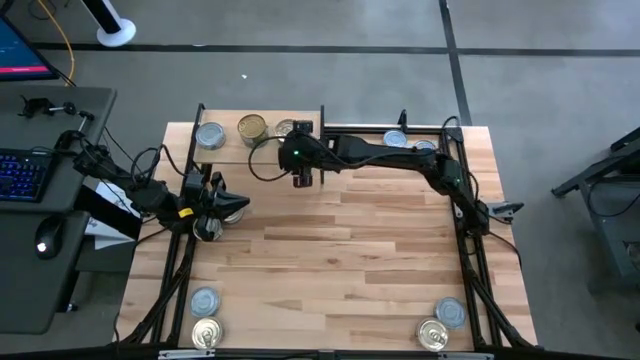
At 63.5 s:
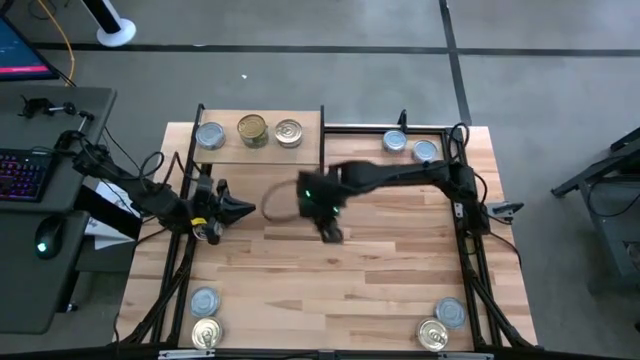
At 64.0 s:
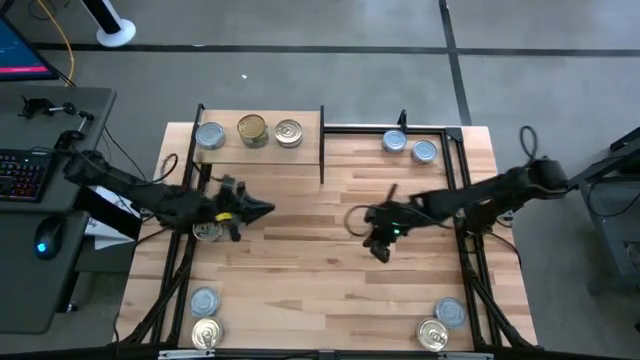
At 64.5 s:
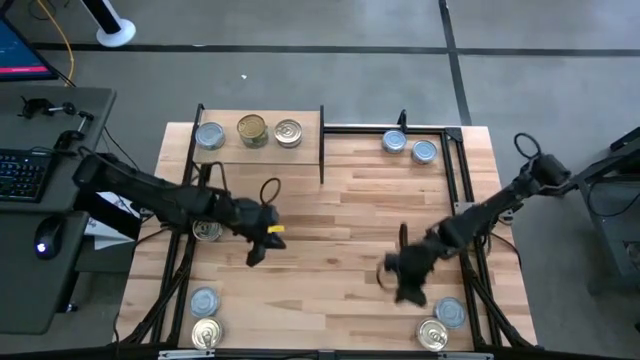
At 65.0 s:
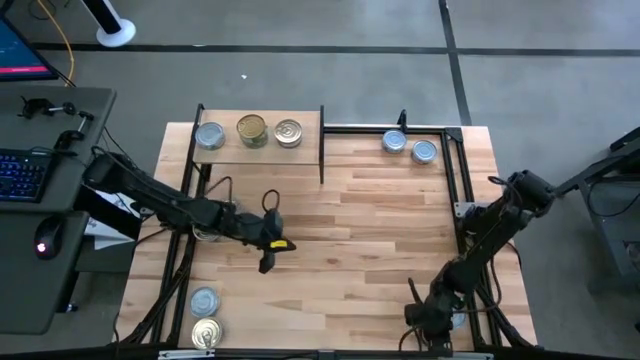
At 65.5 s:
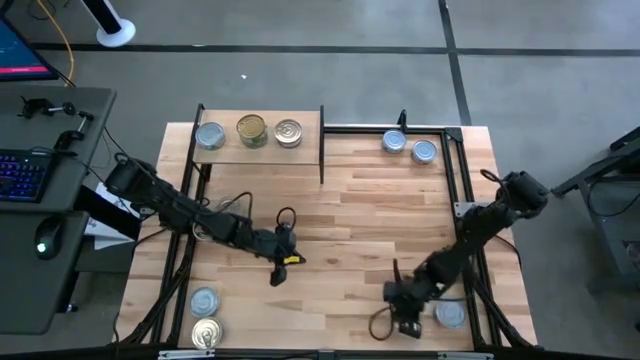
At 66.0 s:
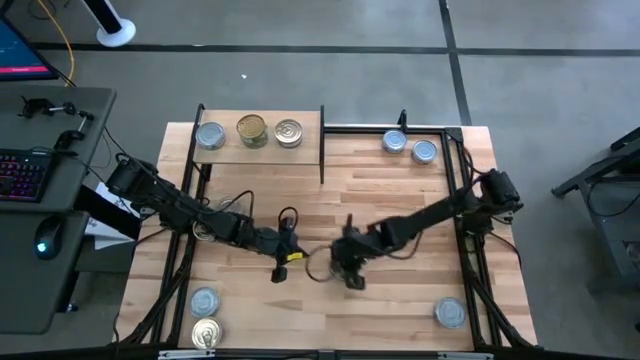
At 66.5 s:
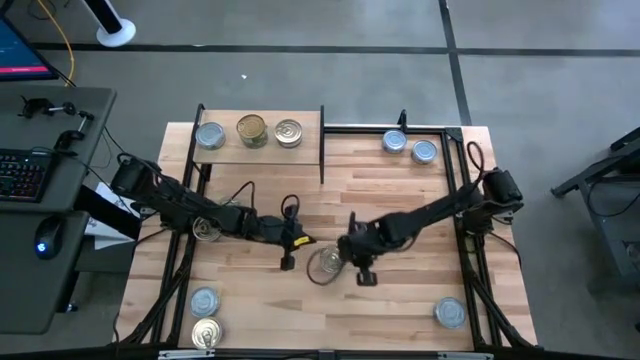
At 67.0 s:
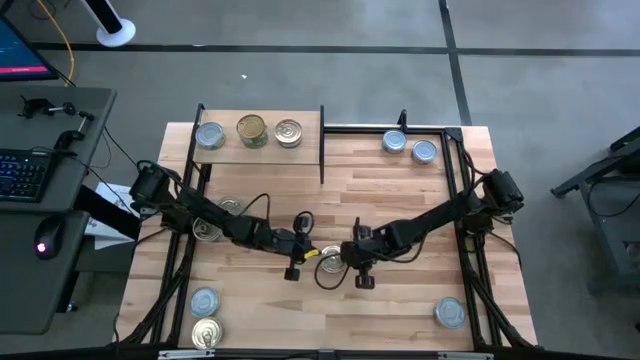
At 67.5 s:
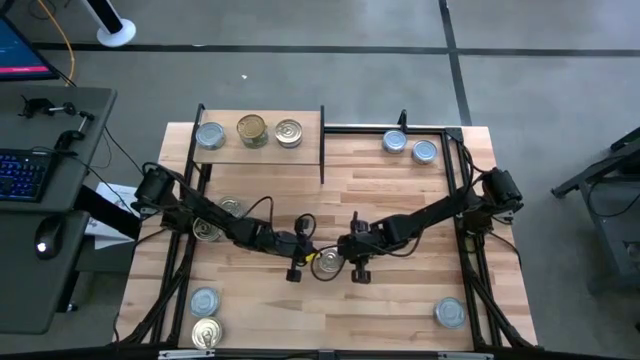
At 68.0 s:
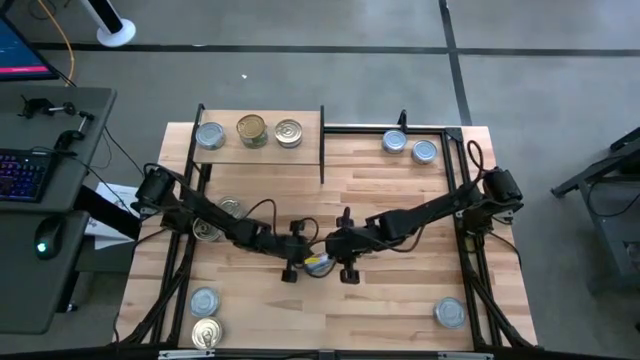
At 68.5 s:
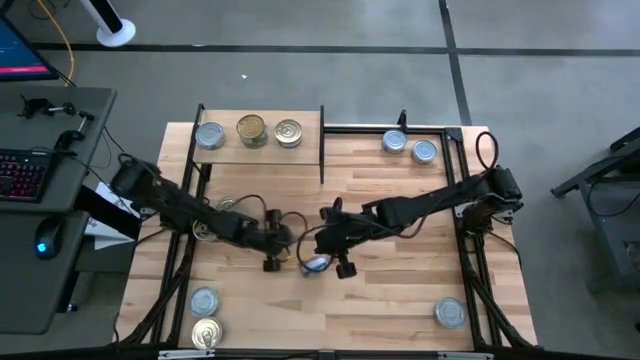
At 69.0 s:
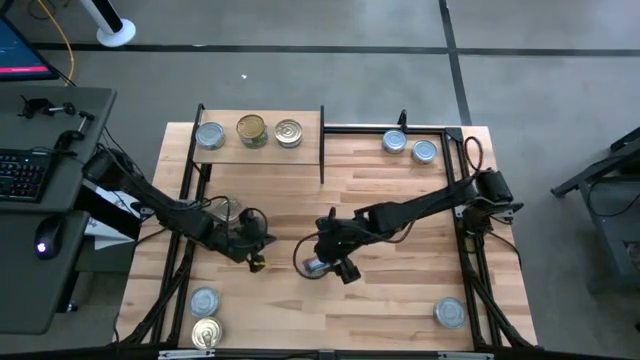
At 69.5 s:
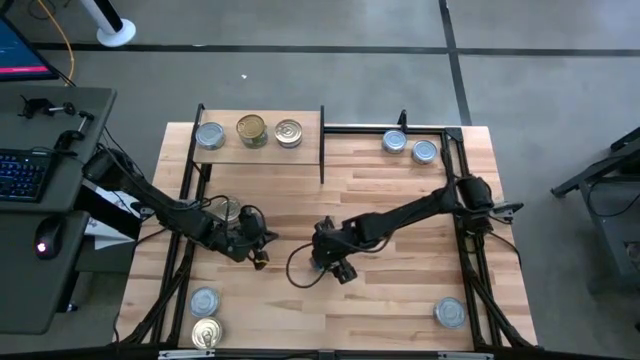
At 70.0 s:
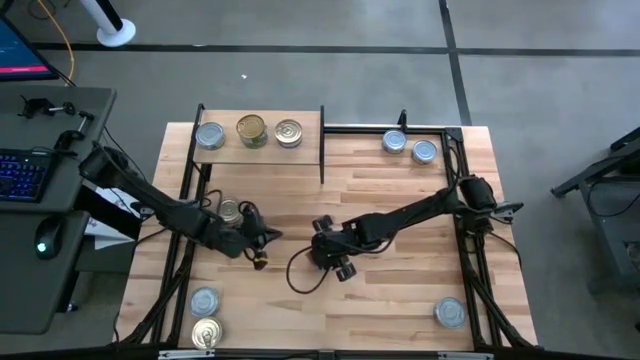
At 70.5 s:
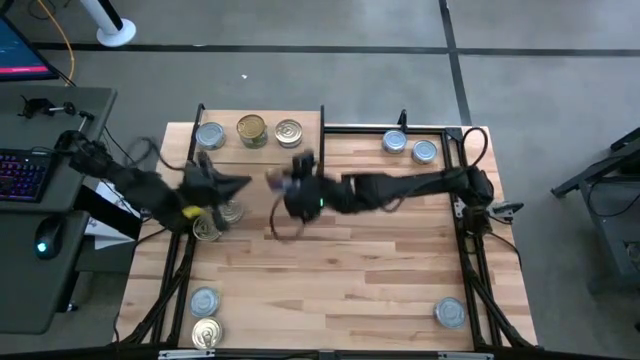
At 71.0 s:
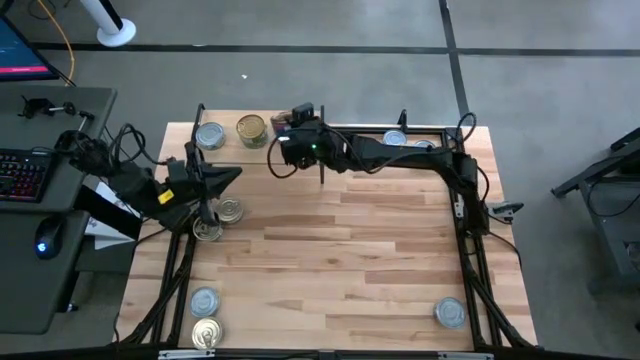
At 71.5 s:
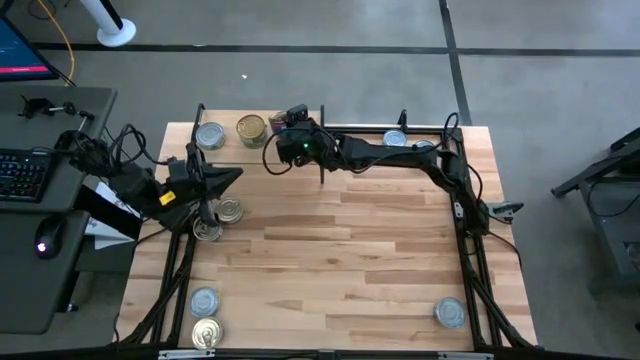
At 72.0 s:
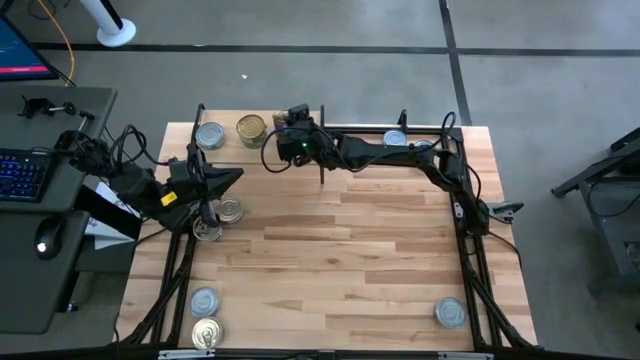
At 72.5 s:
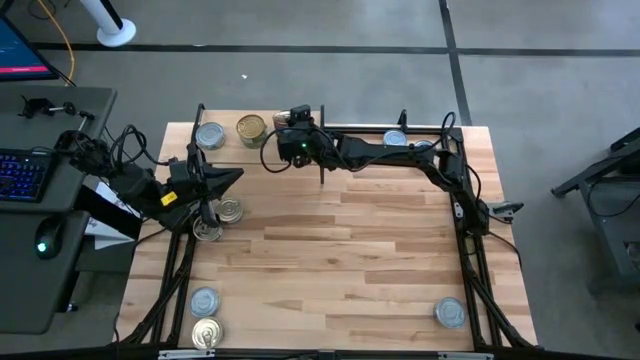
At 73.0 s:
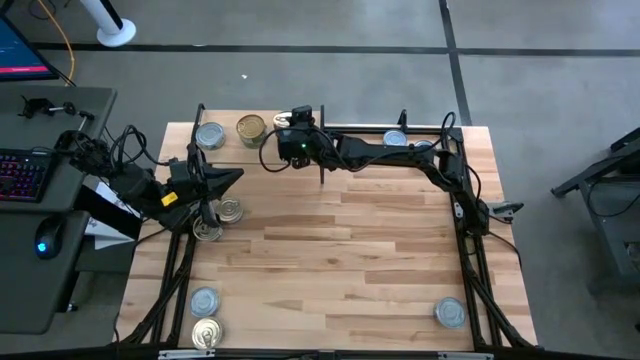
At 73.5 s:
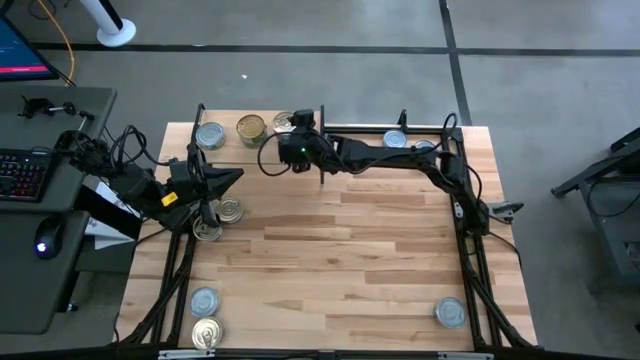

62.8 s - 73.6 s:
Task: Stack canned seafood by type on shelf
Stack the blue-pink tuna can on top of the blue-pink tuna can on the shelf

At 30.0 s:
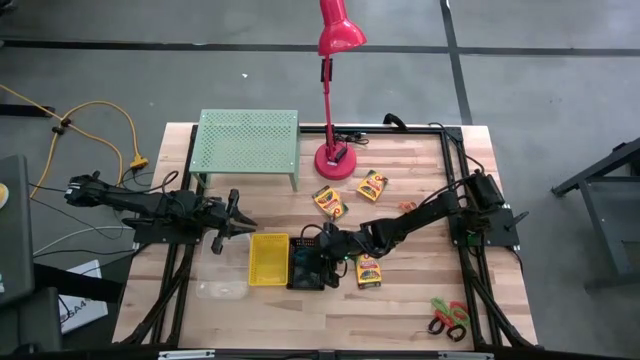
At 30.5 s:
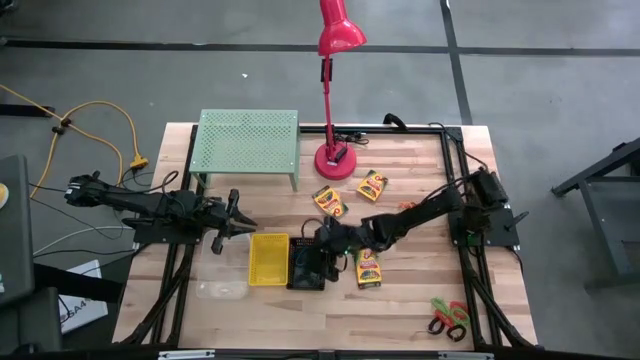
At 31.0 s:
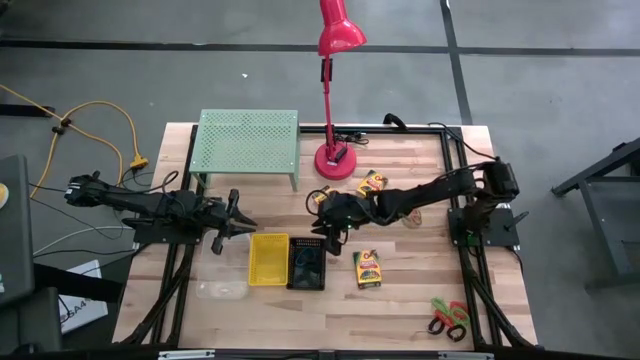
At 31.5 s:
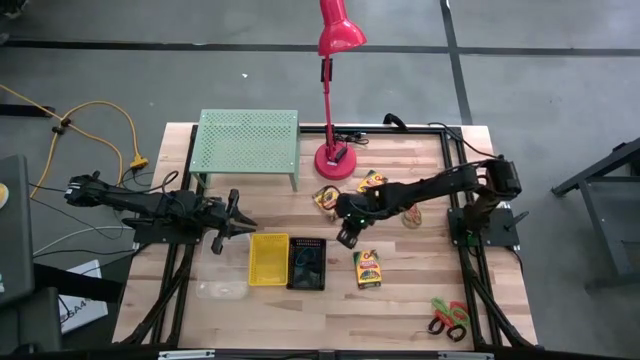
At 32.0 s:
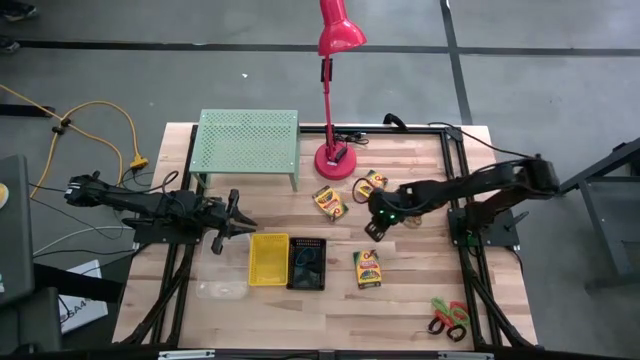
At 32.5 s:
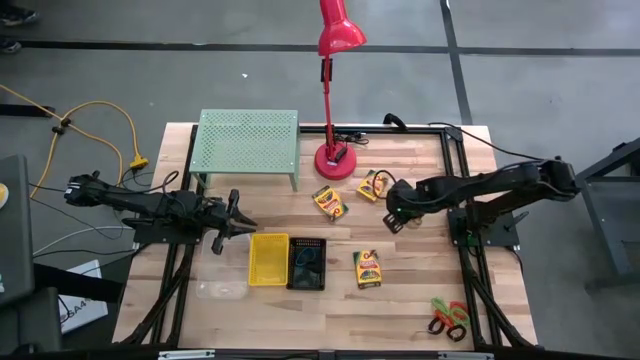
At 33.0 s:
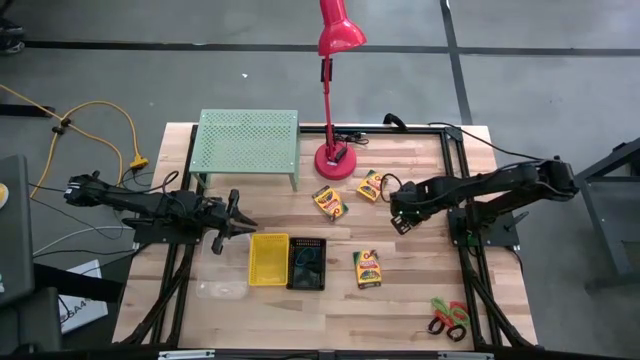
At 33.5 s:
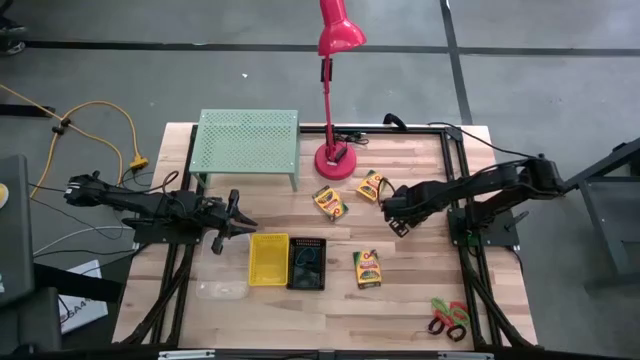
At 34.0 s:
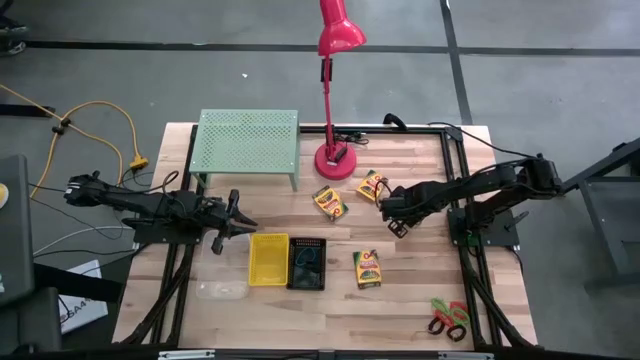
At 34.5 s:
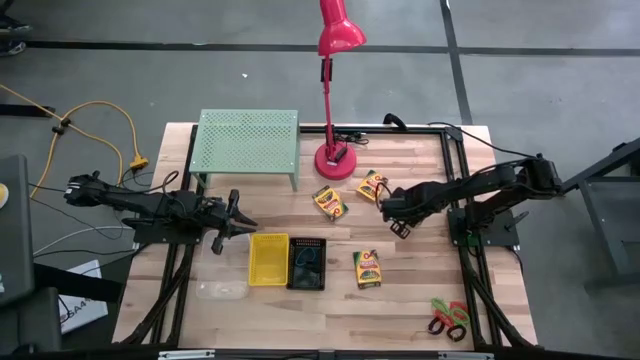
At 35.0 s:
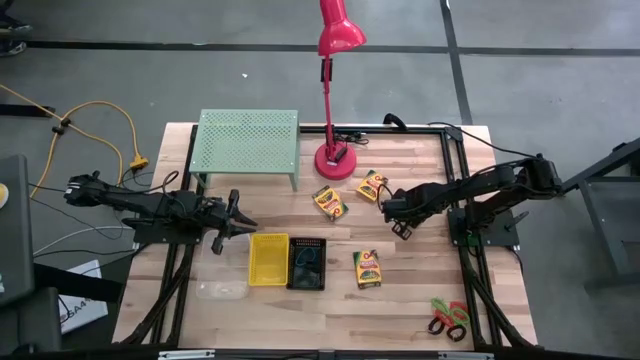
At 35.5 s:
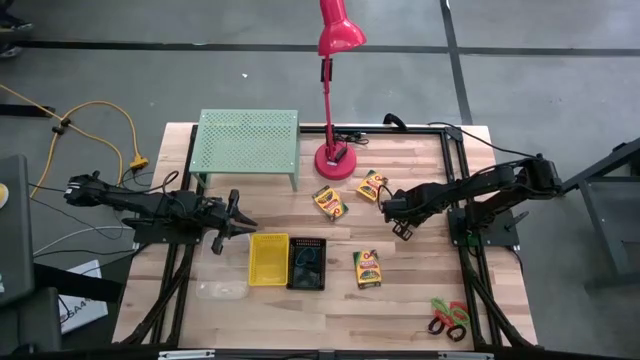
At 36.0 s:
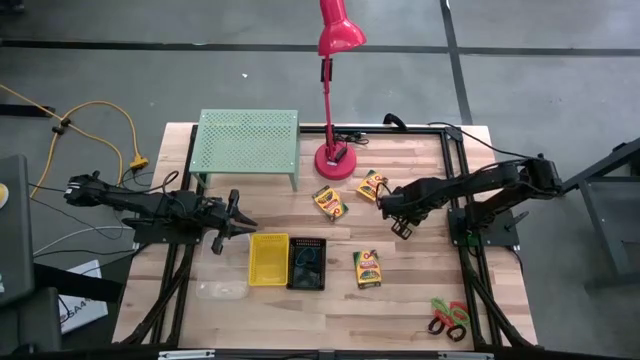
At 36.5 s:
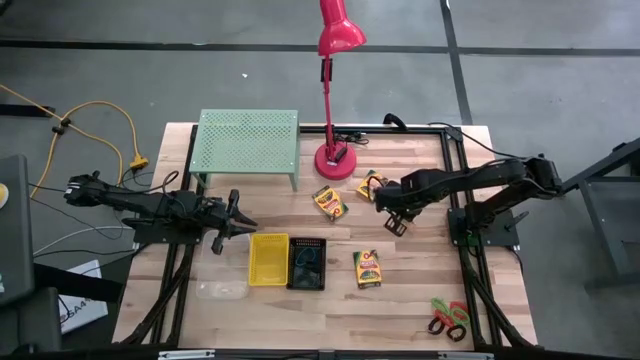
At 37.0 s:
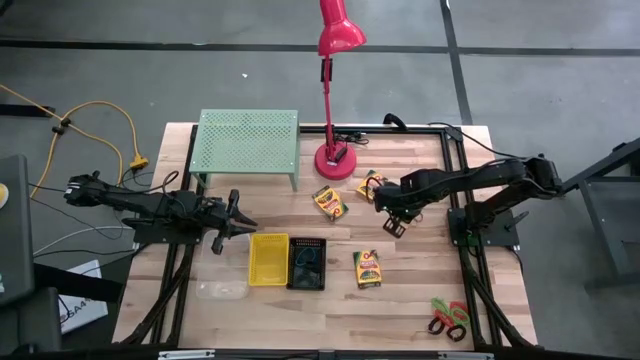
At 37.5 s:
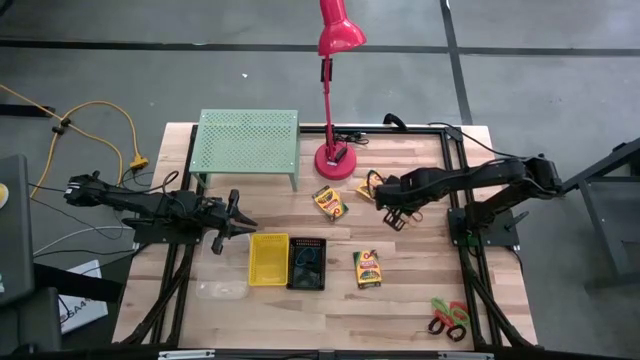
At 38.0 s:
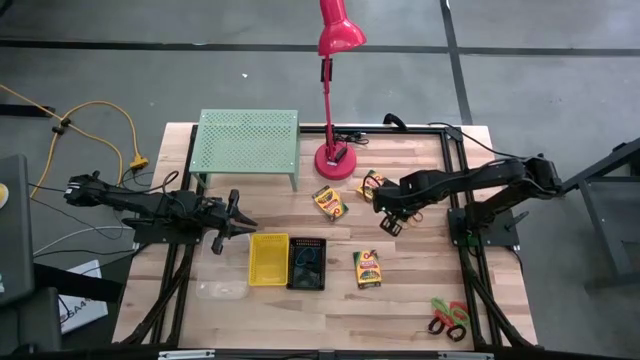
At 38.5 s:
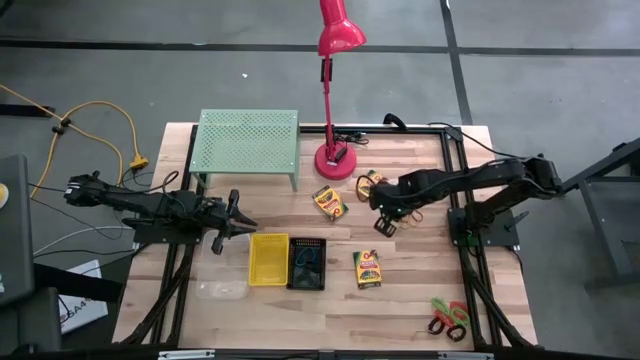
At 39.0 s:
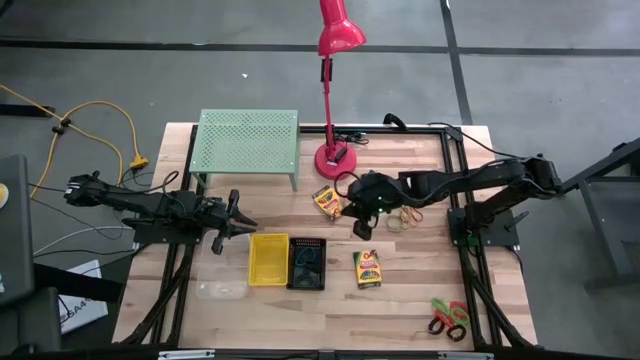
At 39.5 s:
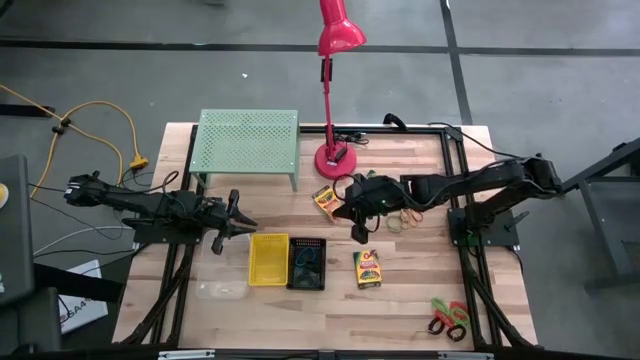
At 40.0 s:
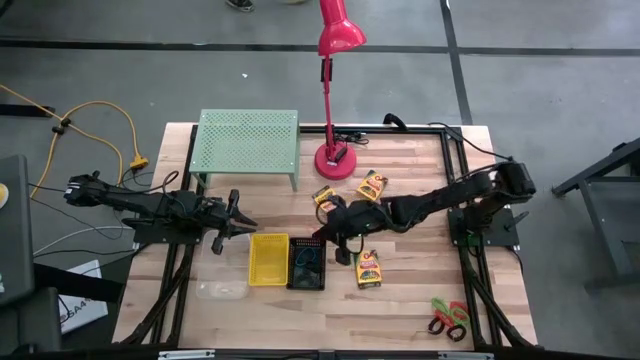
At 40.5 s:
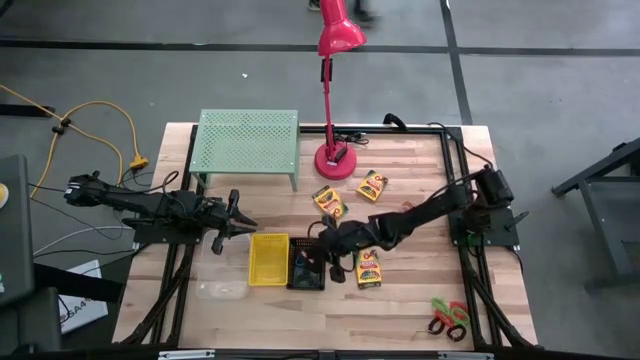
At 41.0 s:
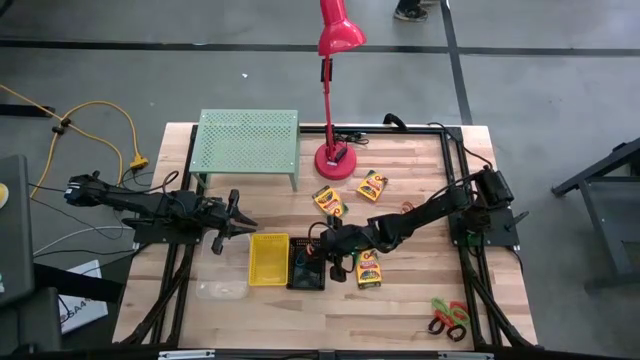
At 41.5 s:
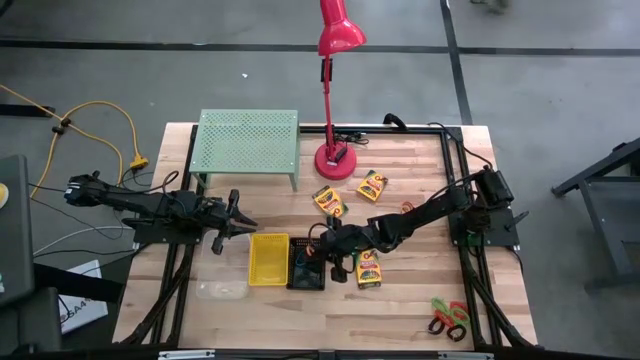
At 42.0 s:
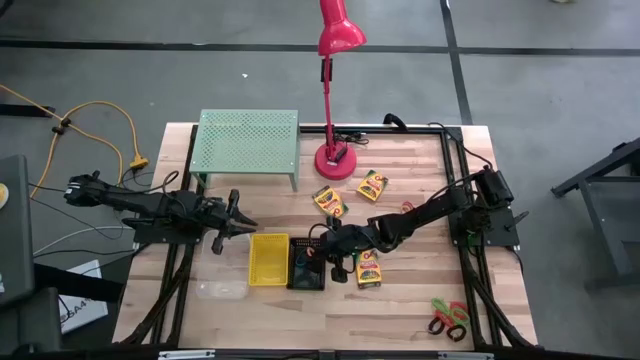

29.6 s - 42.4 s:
Task: Pick & Place Office Desk Supplies
Put the orange rubber band into the black bin
